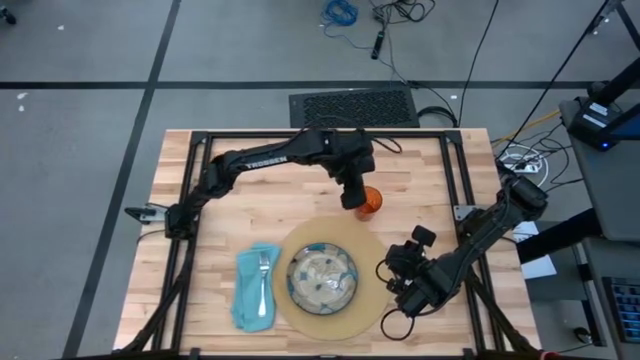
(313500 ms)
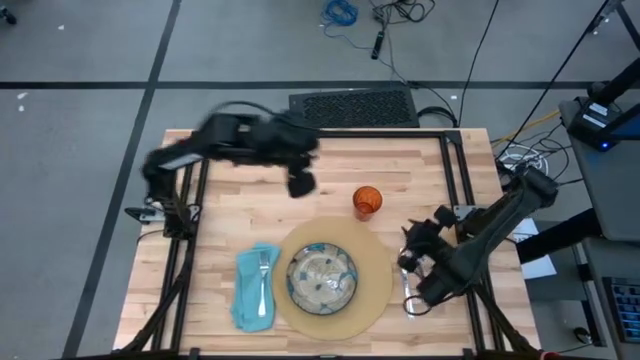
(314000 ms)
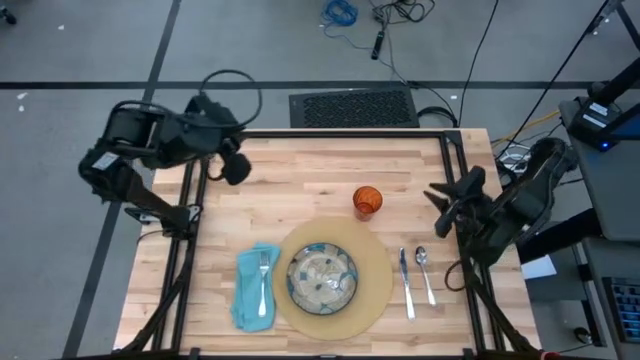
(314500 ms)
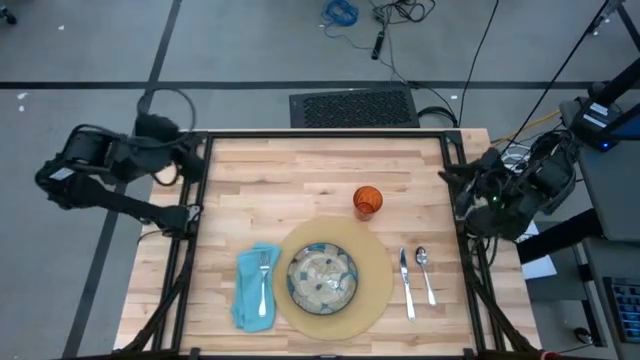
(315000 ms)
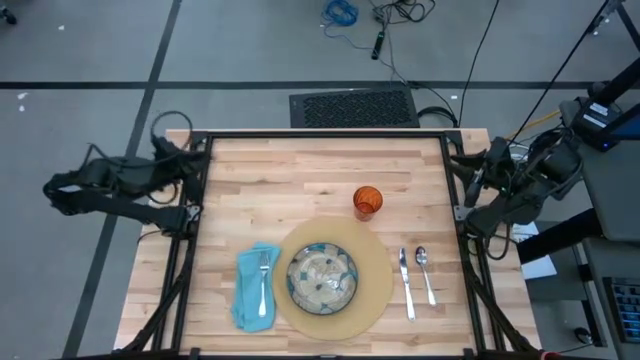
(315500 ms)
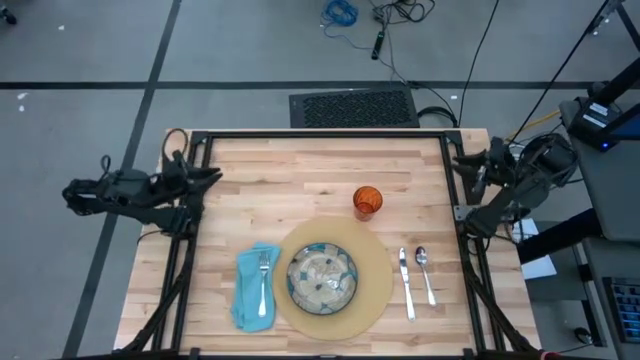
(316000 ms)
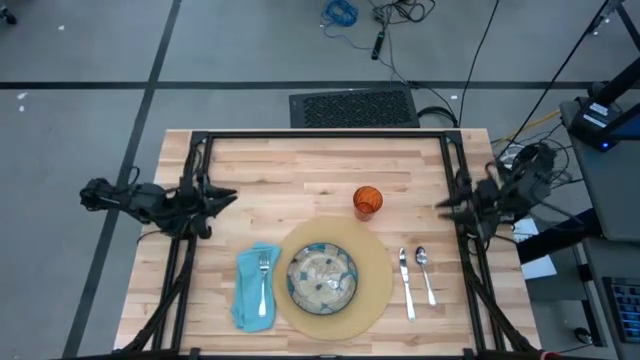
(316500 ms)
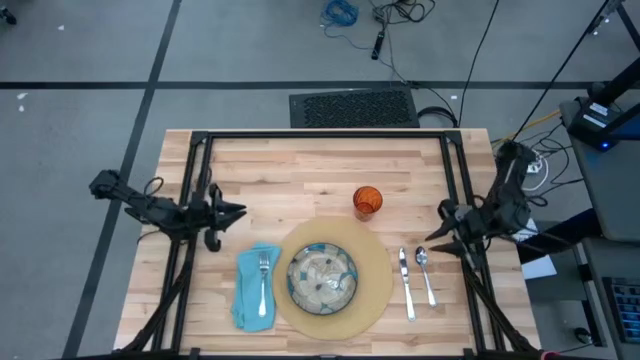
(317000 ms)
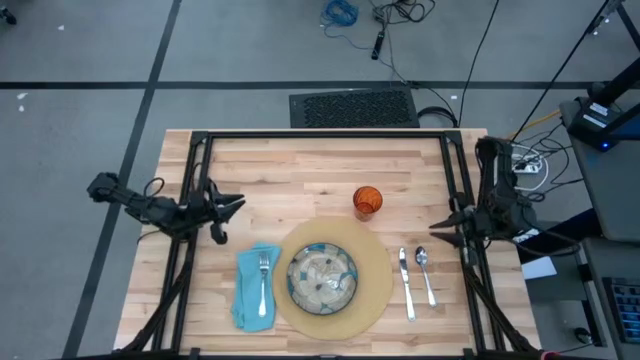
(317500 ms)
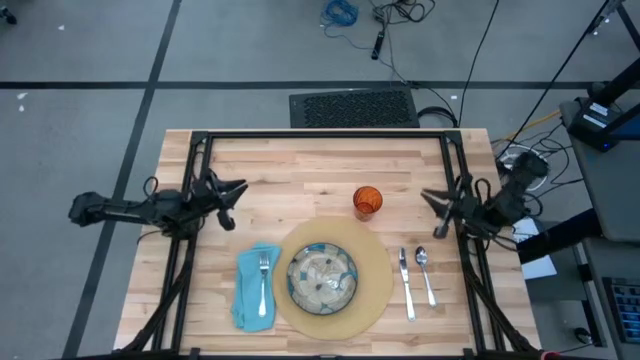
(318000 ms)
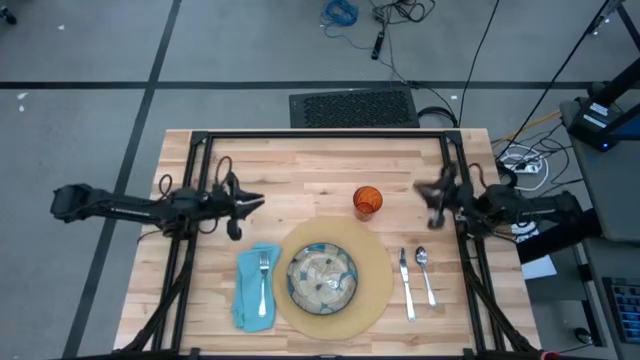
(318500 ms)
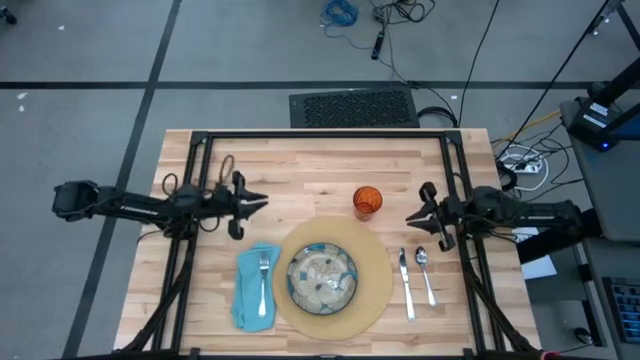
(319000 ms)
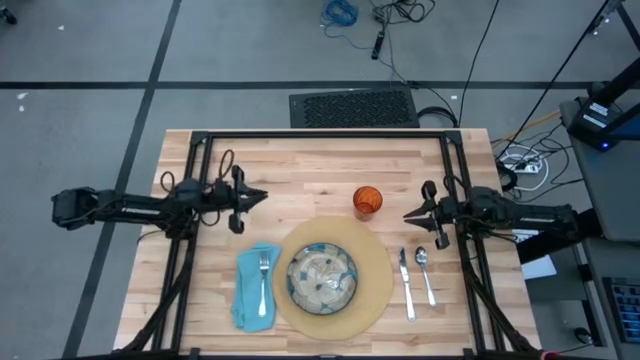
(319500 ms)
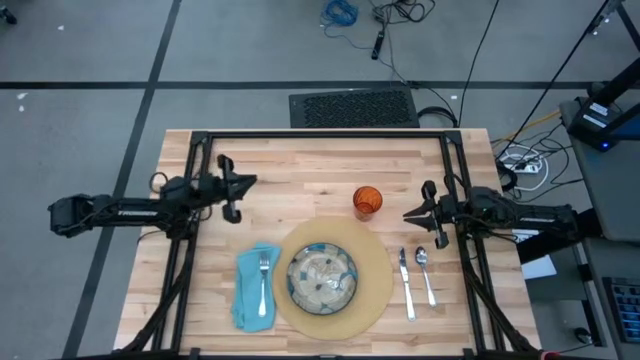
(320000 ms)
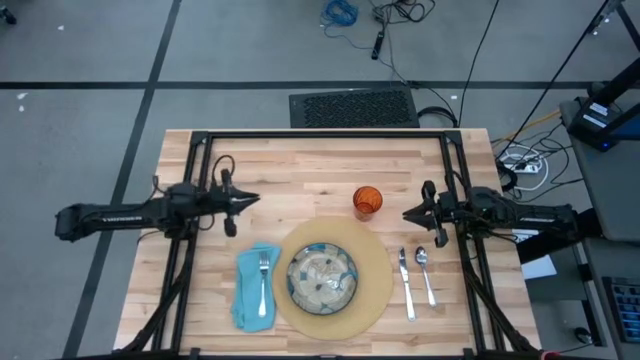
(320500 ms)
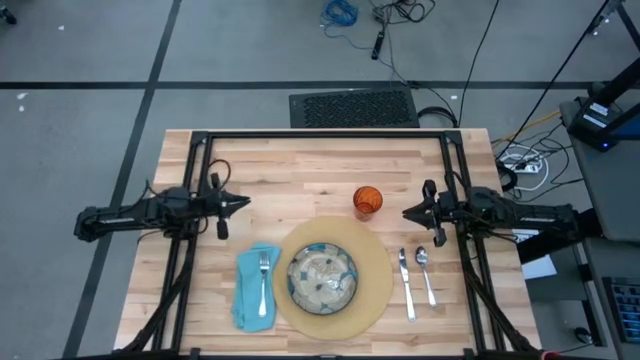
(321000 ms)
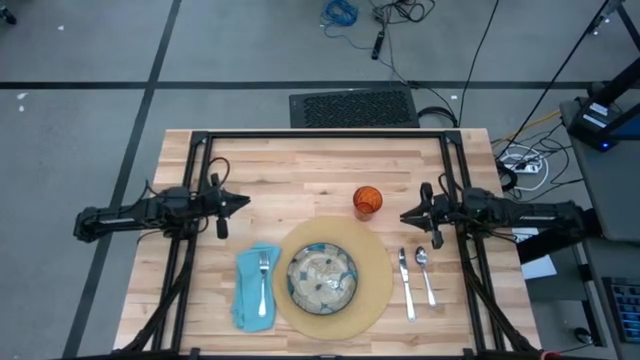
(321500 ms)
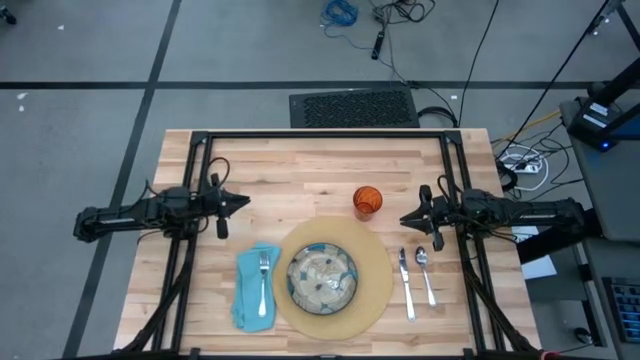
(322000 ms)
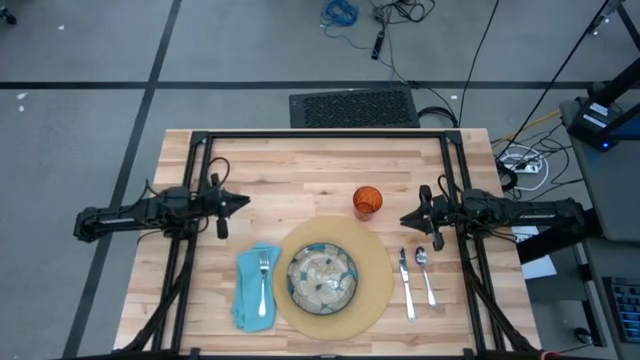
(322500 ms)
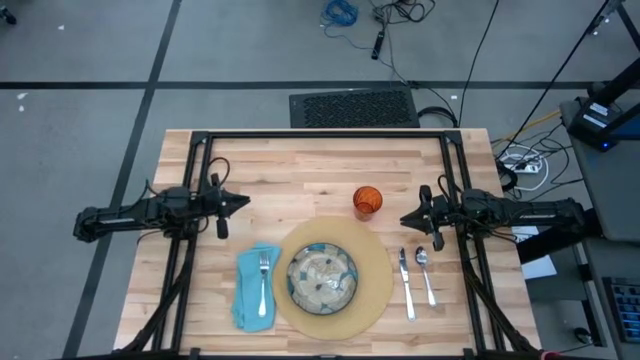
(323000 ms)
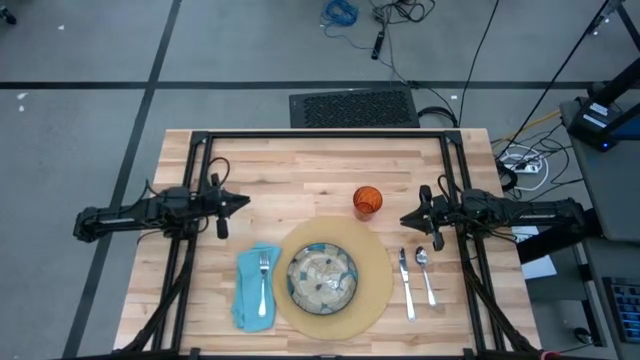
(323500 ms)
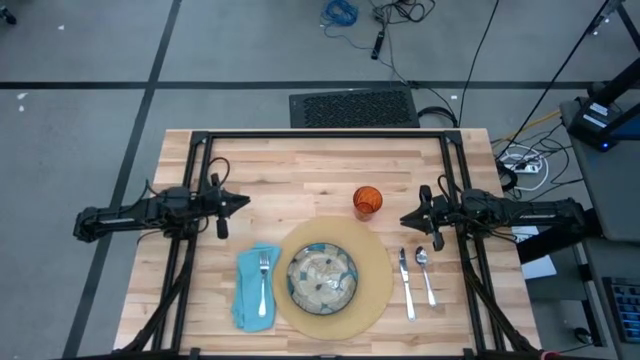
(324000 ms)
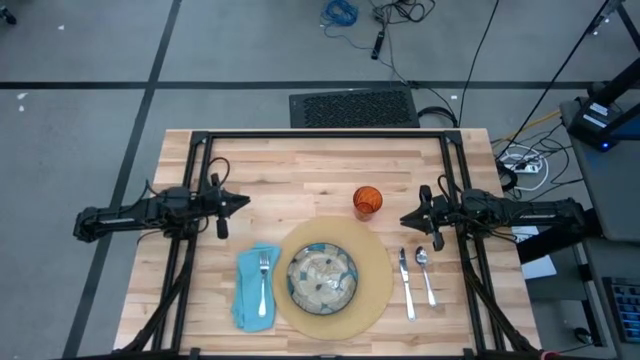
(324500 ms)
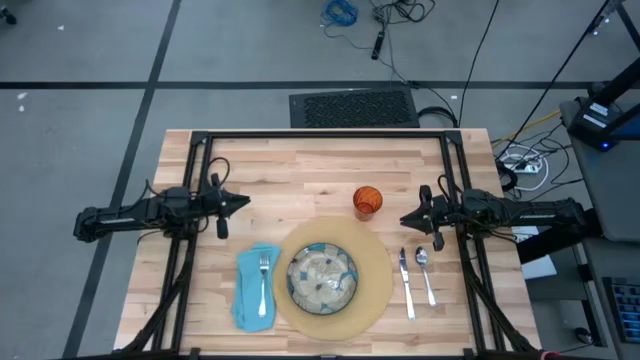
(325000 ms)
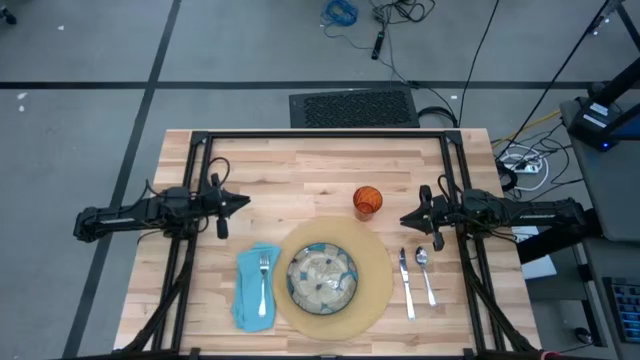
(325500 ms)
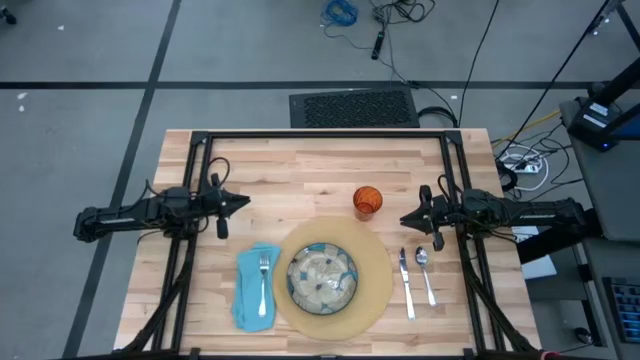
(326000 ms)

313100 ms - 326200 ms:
Task: Set table place
Return to Home Position
